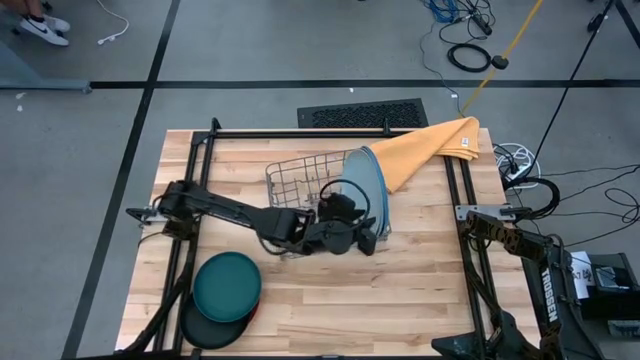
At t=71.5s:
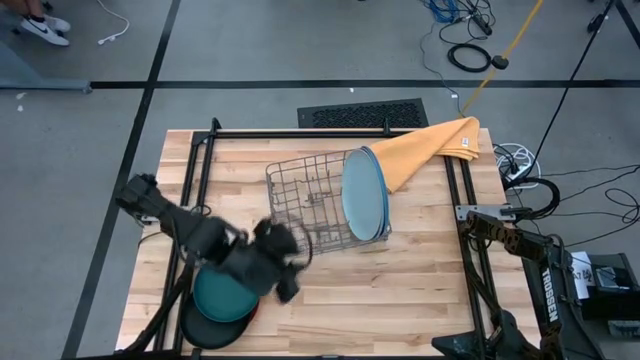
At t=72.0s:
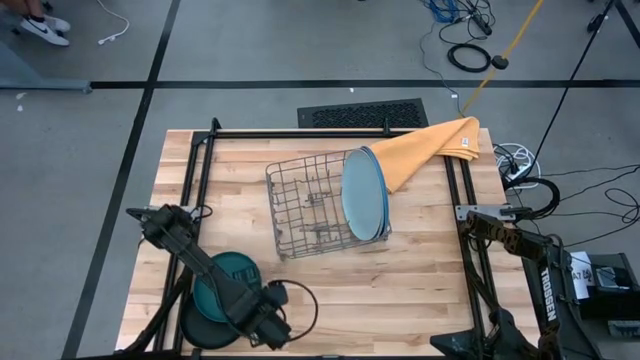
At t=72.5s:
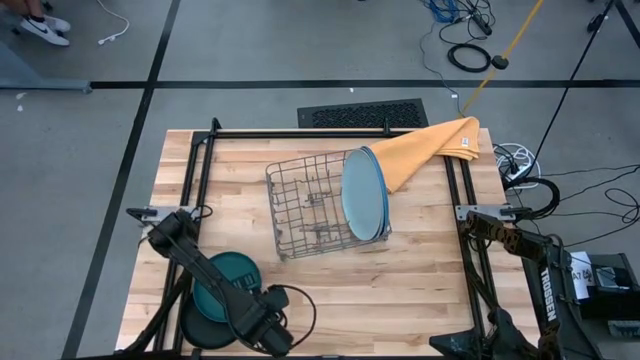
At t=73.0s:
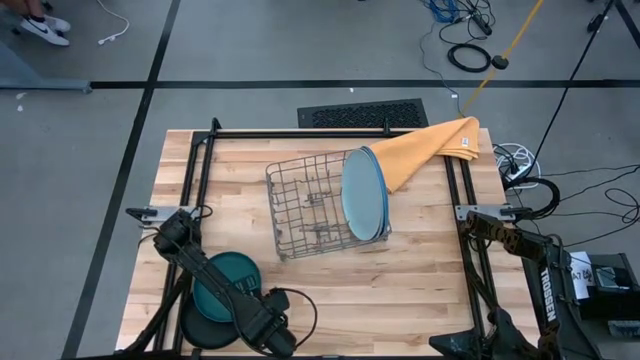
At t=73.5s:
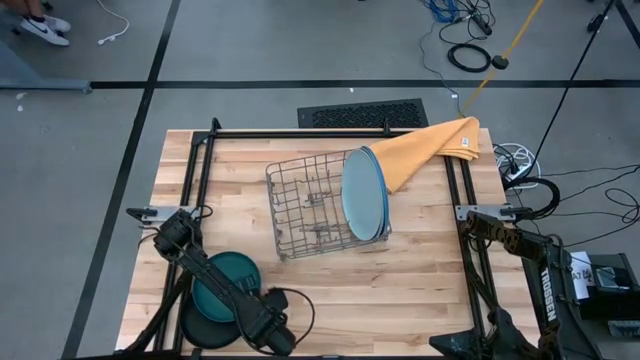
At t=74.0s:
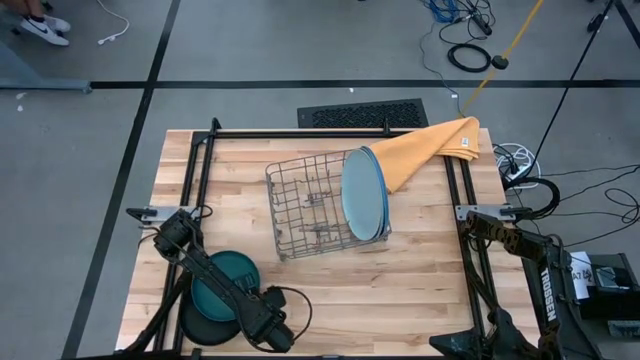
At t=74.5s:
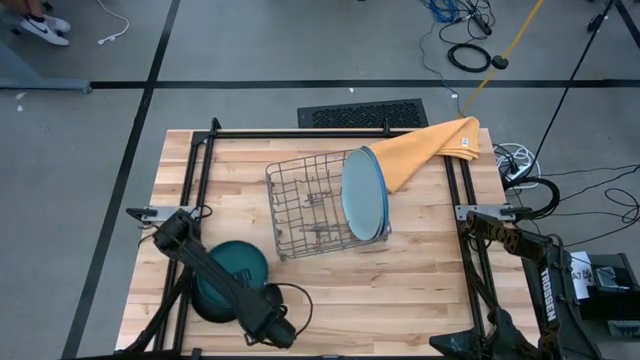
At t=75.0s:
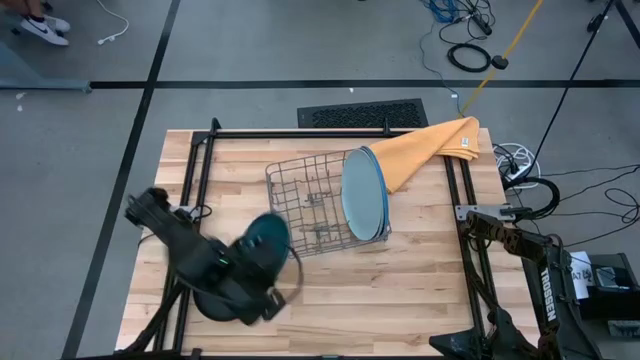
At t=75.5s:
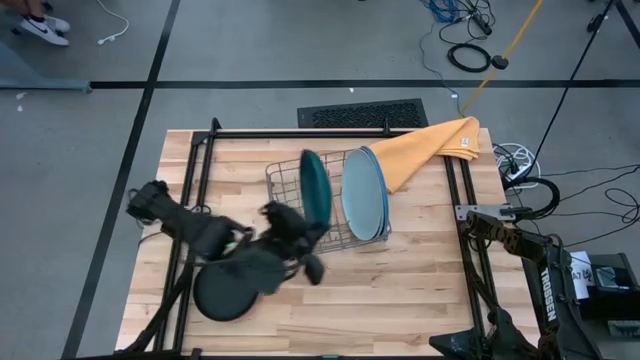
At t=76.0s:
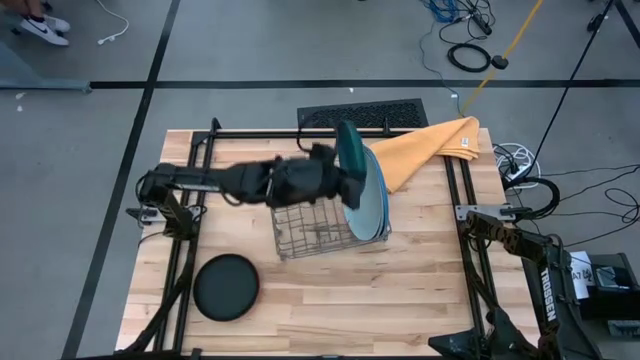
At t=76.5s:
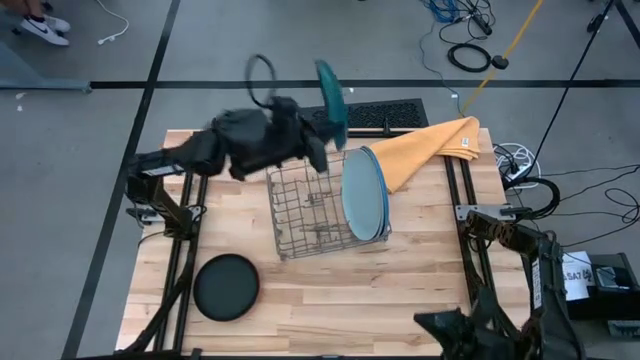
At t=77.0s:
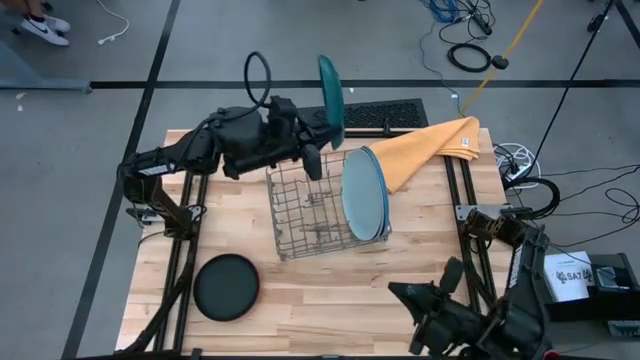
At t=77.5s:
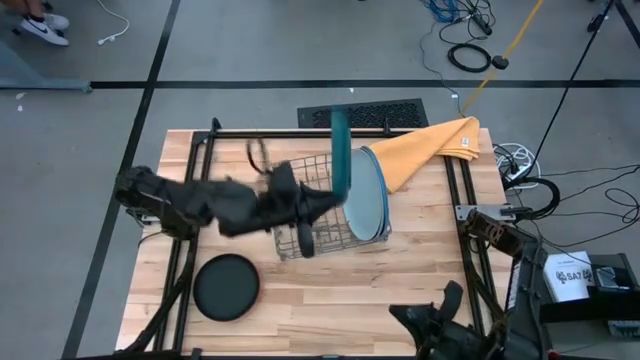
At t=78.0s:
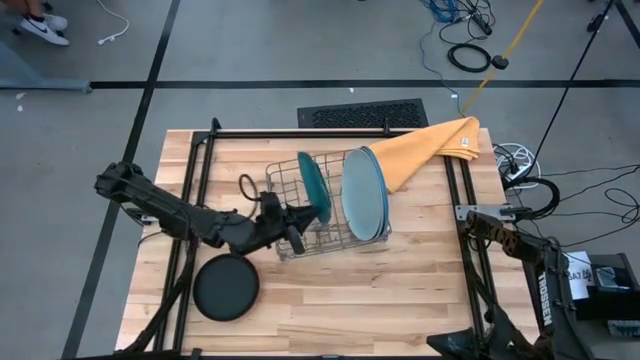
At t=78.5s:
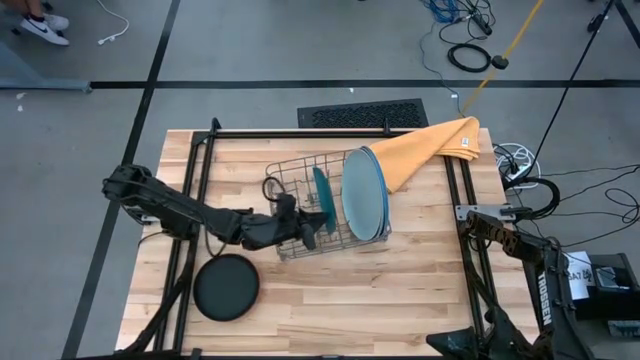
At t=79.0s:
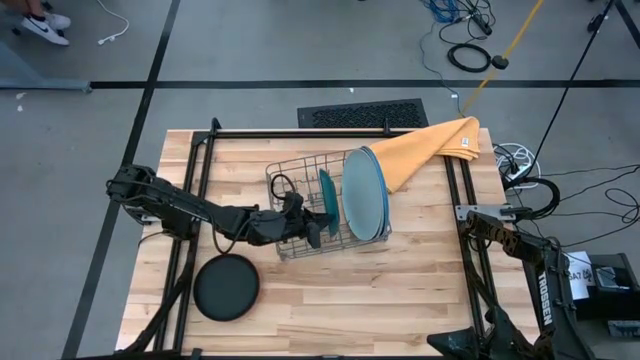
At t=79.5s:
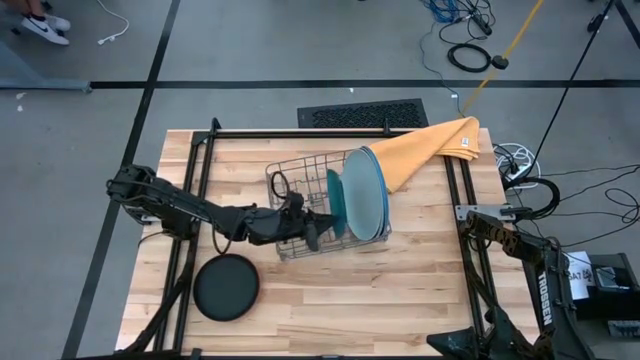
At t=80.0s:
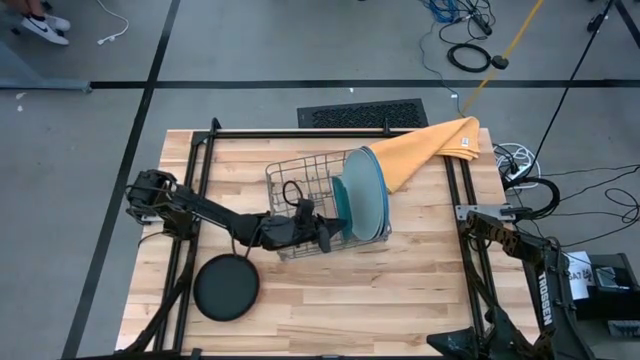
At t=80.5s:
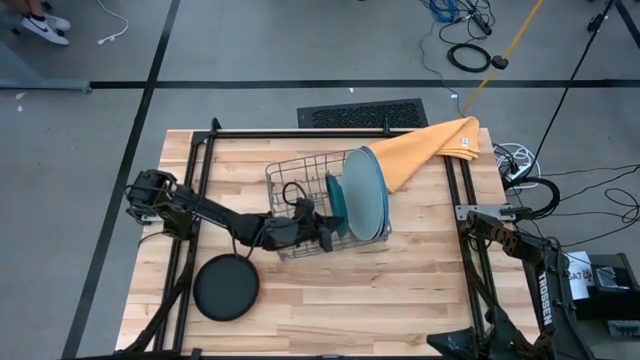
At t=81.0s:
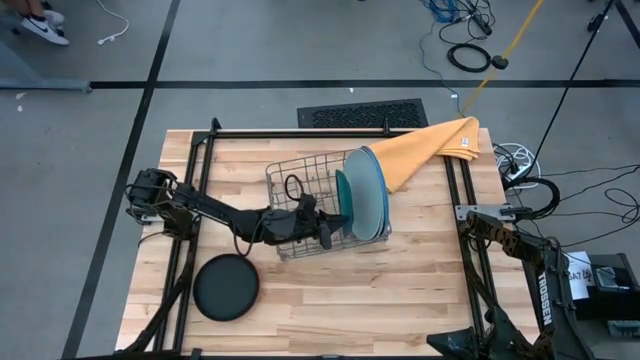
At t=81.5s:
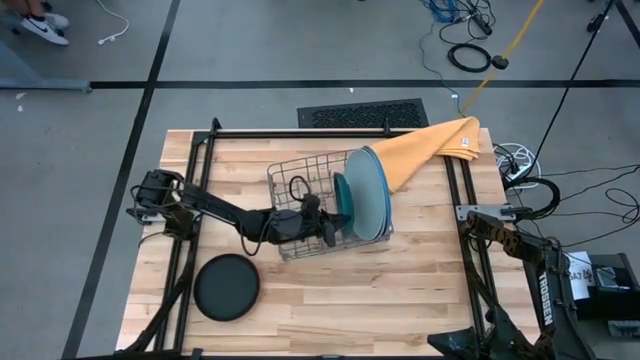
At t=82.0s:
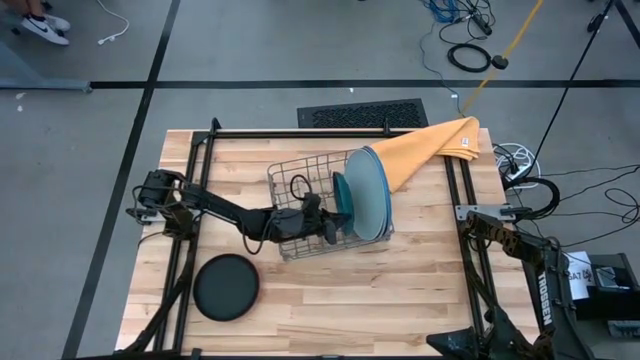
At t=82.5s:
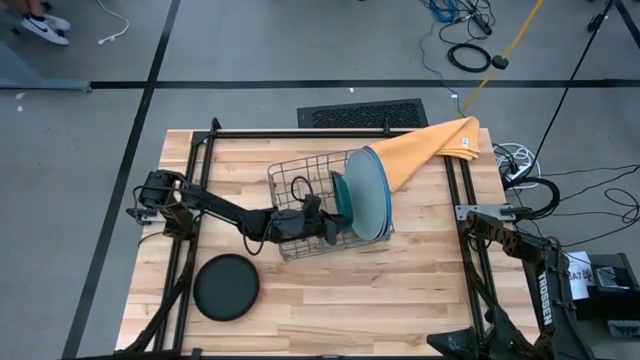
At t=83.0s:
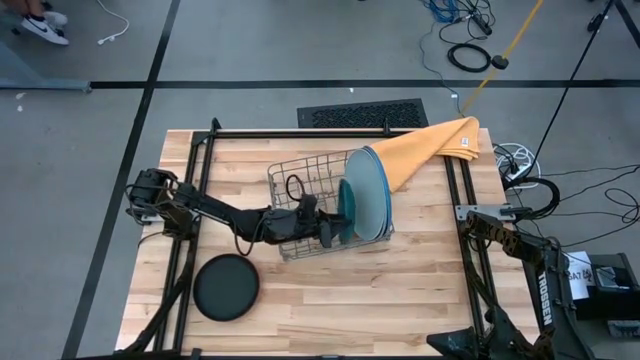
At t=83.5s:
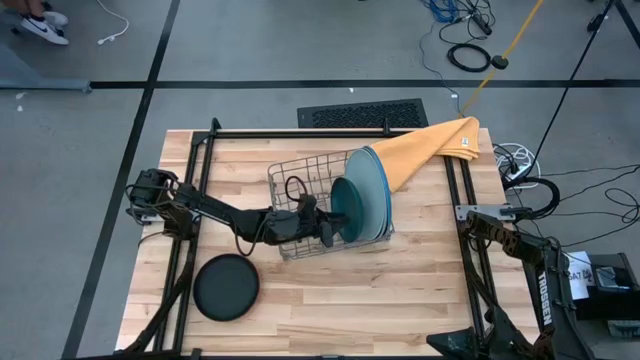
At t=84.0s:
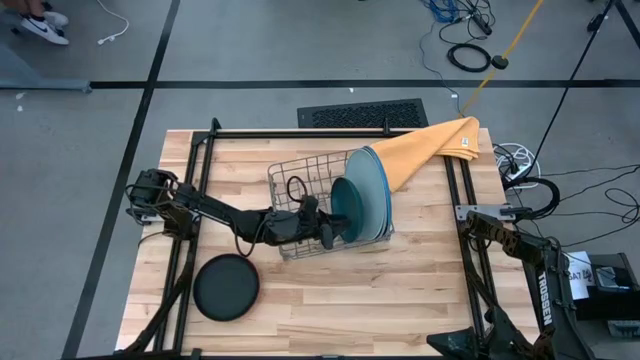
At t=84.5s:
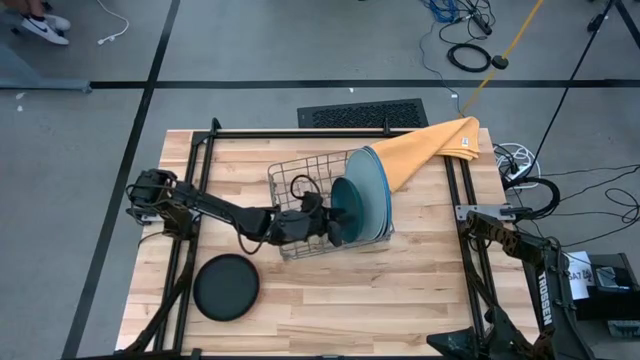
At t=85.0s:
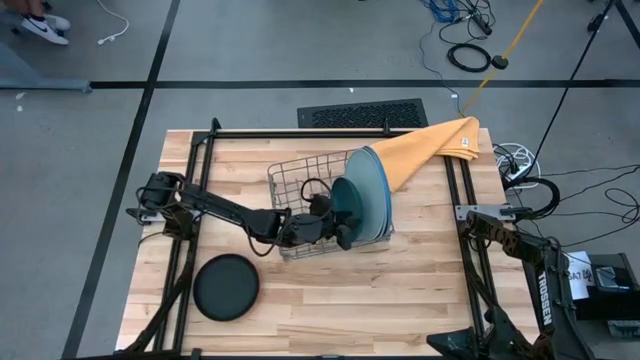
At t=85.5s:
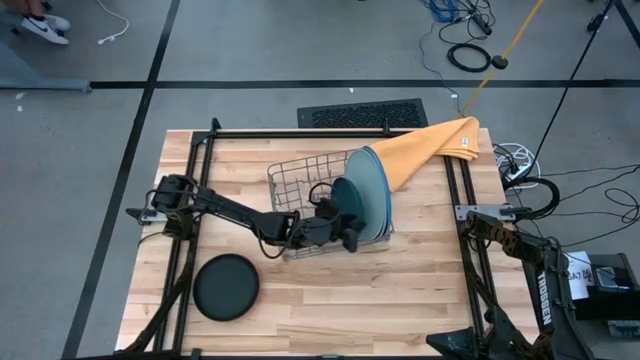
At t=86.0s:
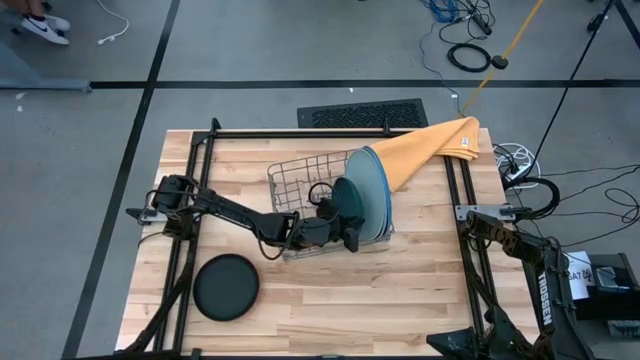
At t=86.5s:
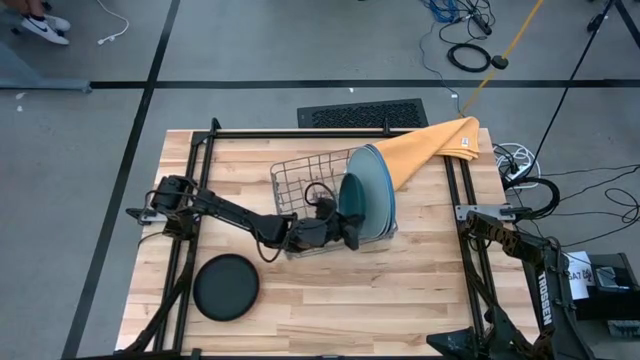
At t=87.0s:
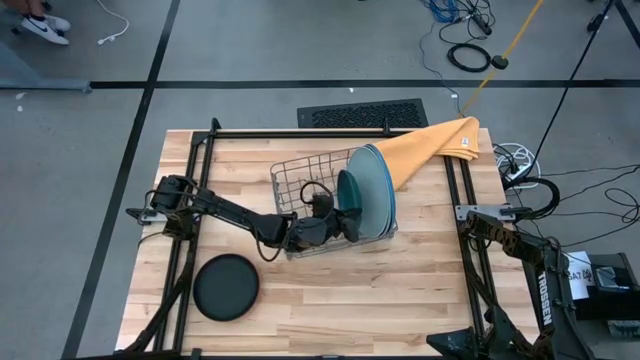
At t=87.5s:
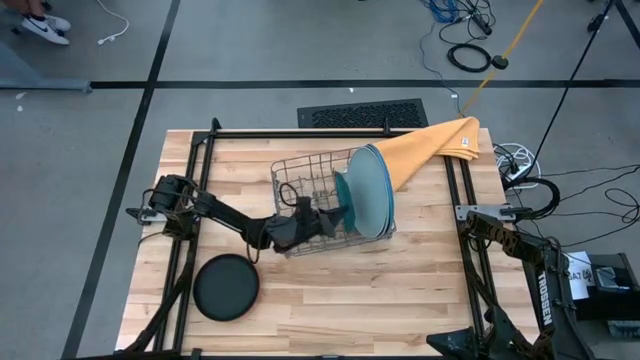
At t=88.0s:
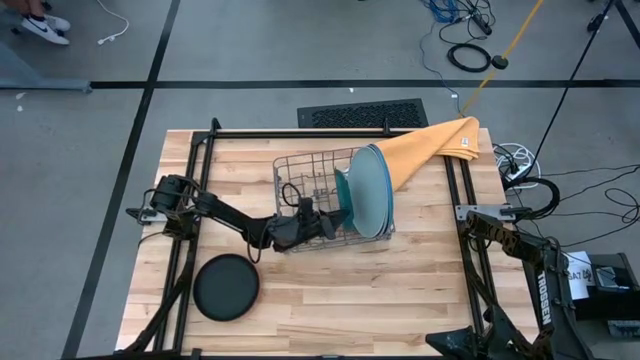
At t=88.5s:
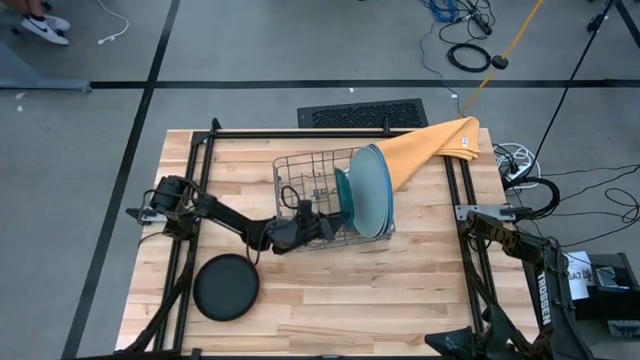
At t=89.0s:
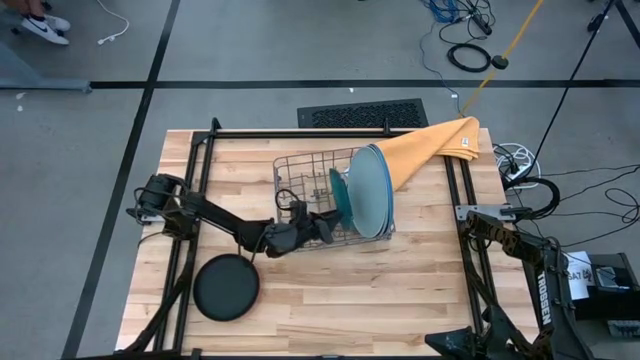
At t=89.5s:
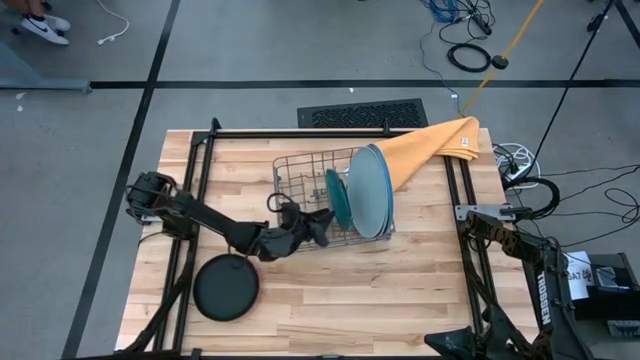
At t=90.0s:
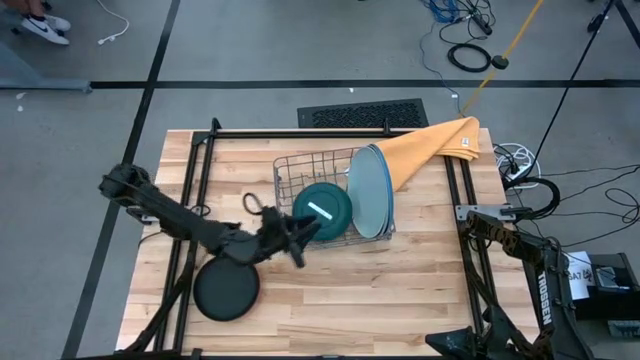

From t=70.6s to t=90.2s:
Task: Sort dishes
Put the dark green plate into the green dish rack

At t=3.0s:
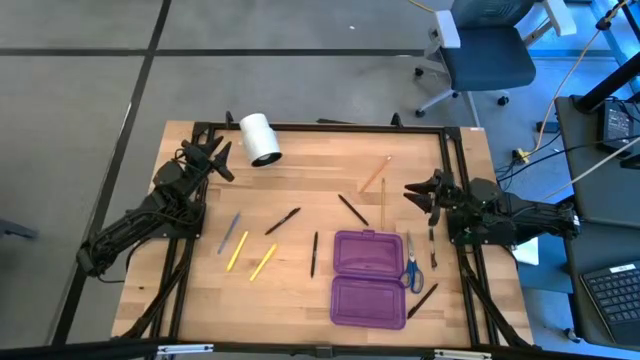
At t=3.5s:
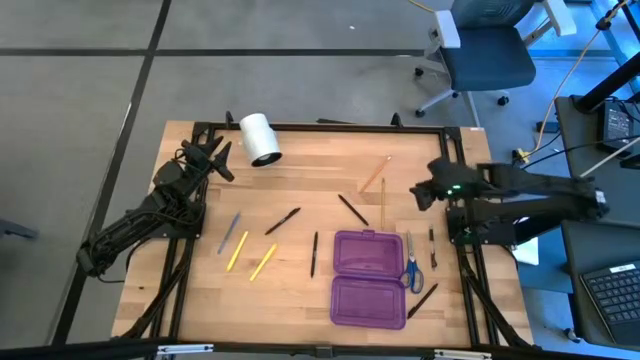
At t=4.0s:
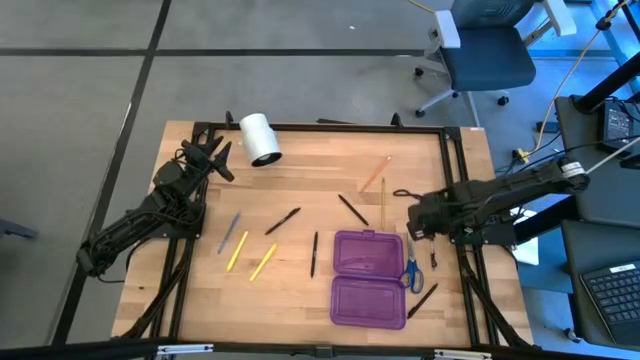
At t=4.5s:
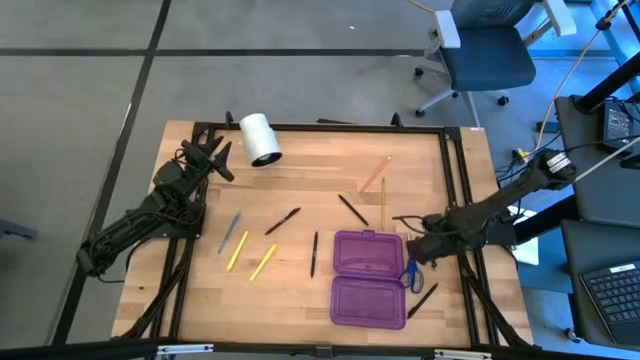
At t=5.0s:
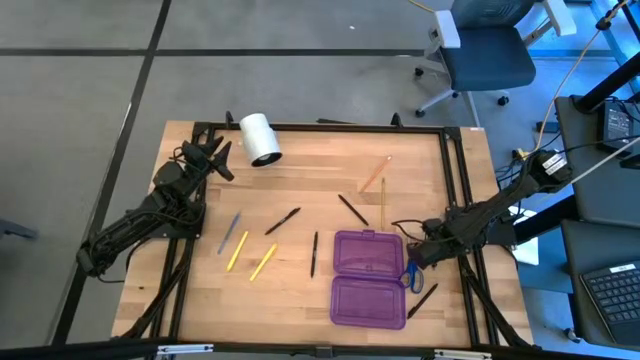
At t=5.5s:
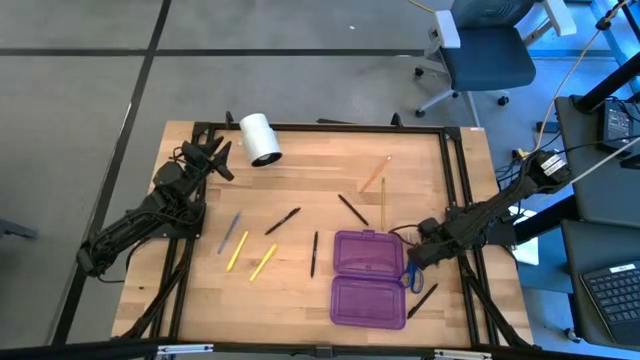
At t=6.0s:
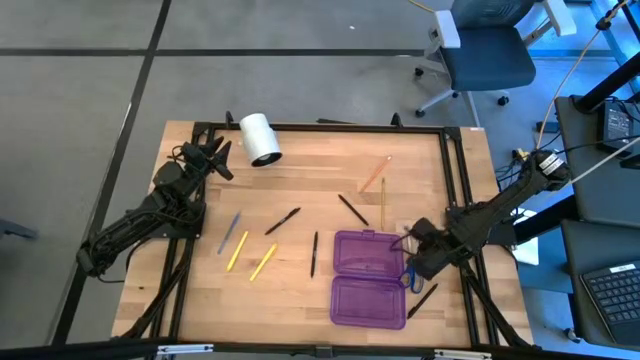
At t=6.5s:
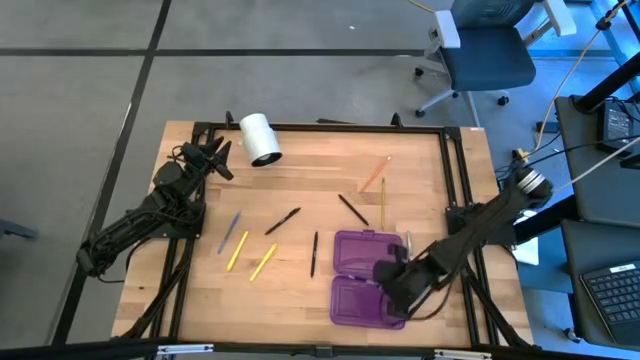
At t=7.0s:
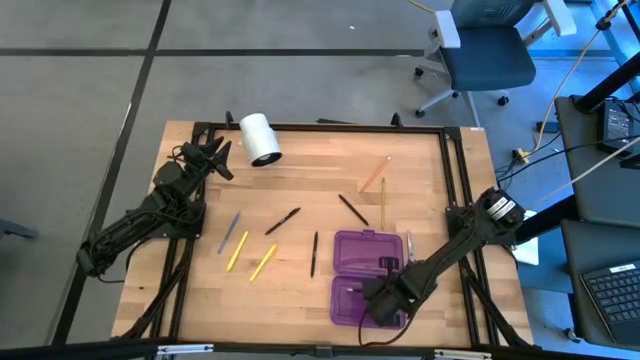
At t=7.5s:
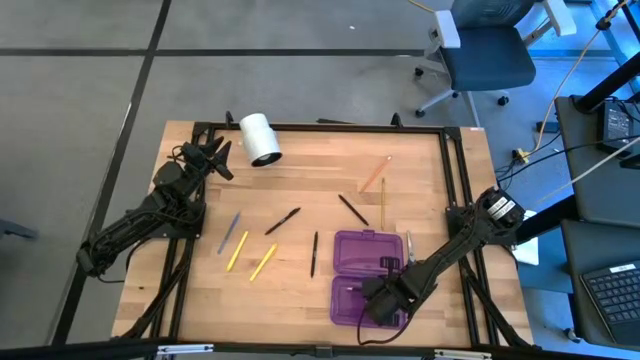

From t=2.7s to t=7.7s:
Task: Pick & place school supplies into a supply box
Put the transparent pen into the purple supply box
